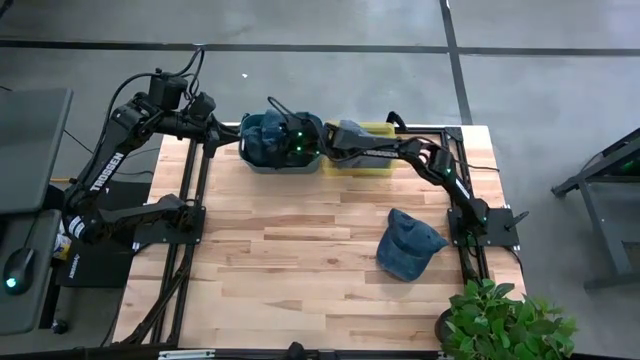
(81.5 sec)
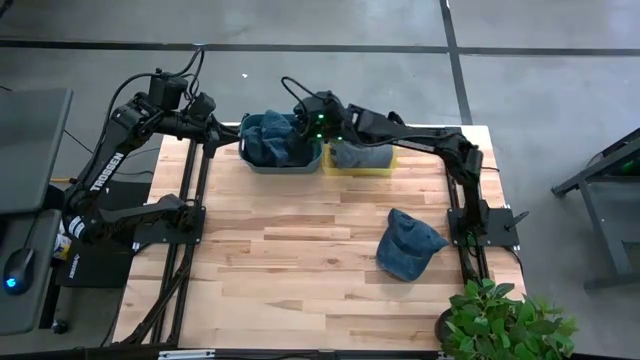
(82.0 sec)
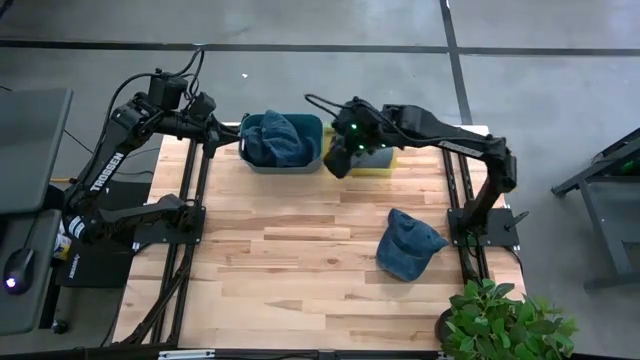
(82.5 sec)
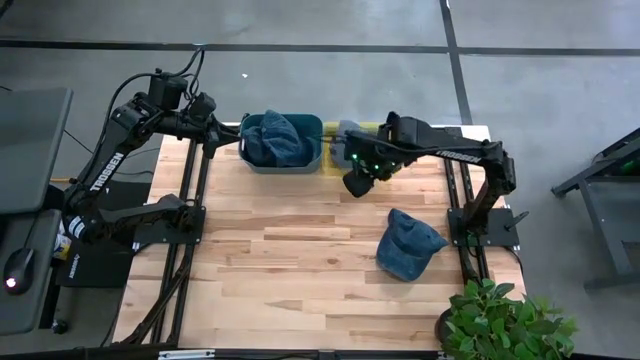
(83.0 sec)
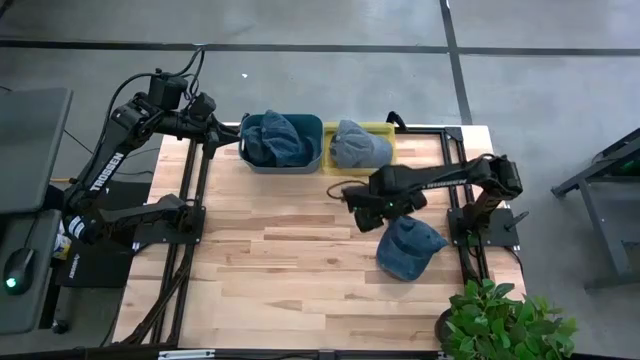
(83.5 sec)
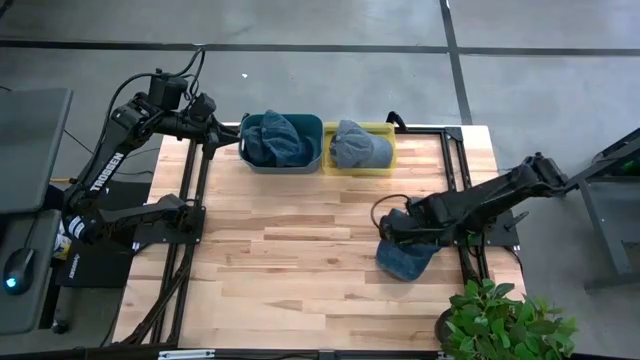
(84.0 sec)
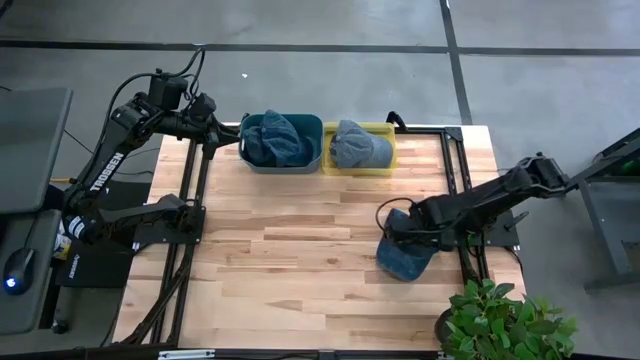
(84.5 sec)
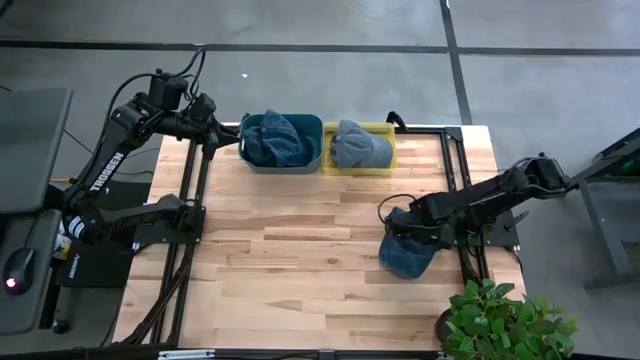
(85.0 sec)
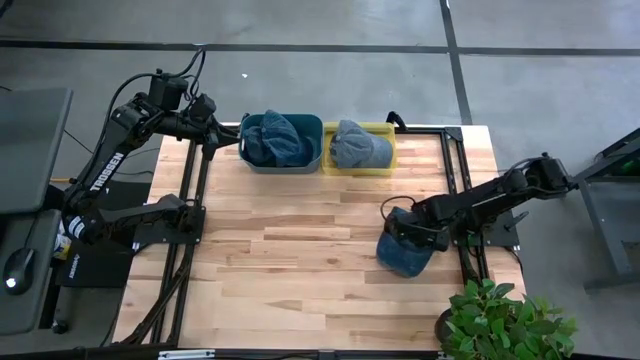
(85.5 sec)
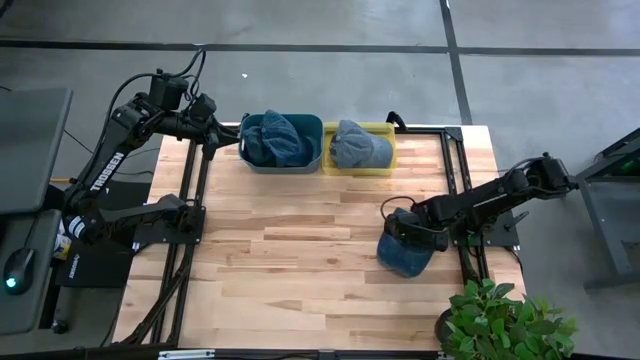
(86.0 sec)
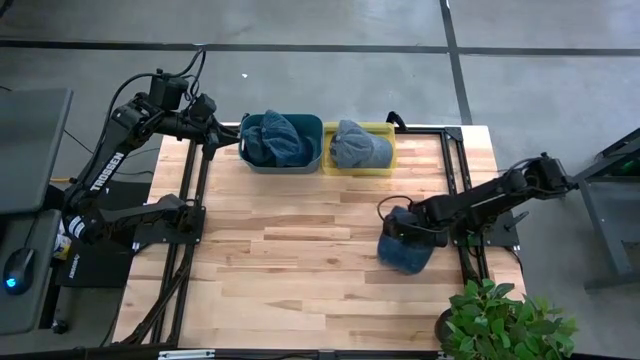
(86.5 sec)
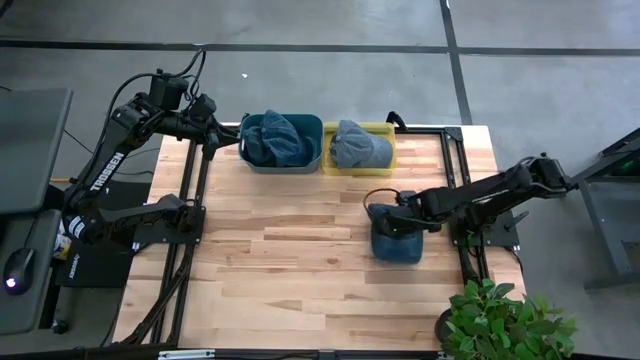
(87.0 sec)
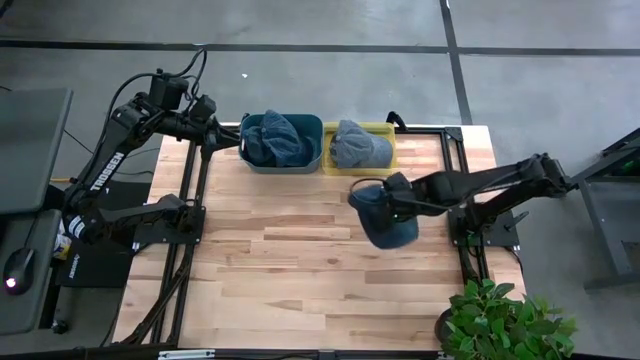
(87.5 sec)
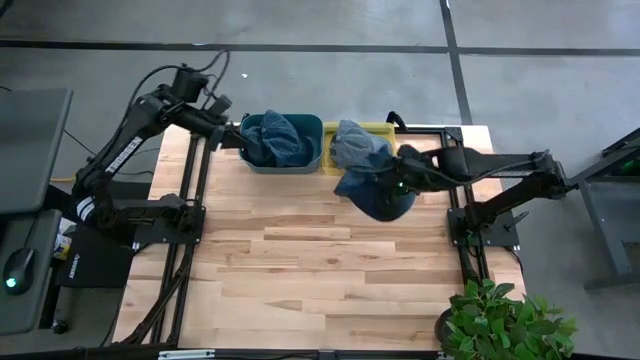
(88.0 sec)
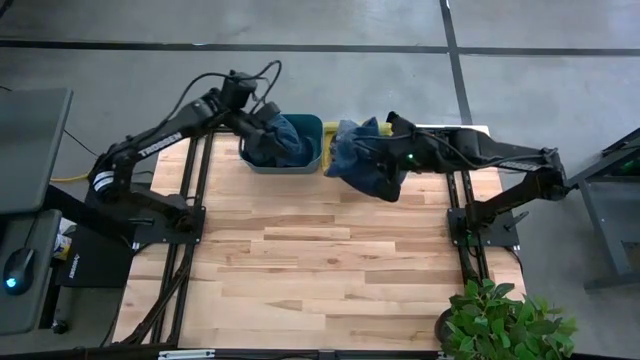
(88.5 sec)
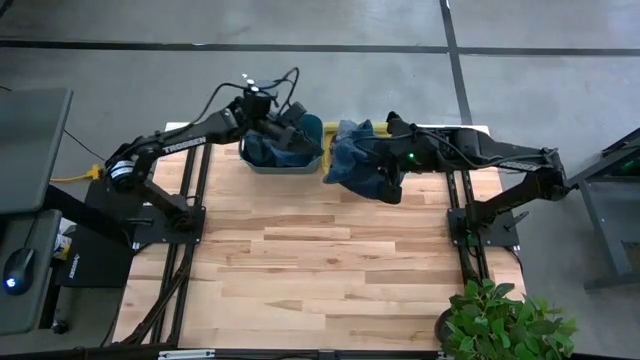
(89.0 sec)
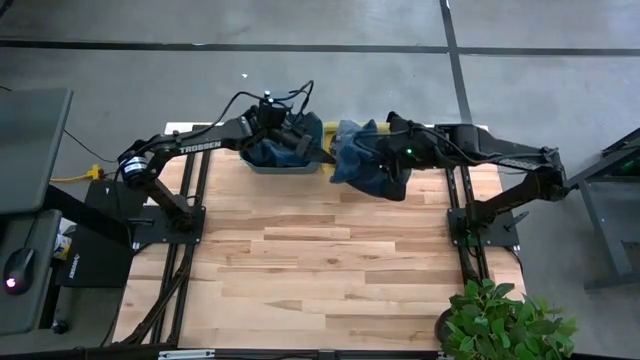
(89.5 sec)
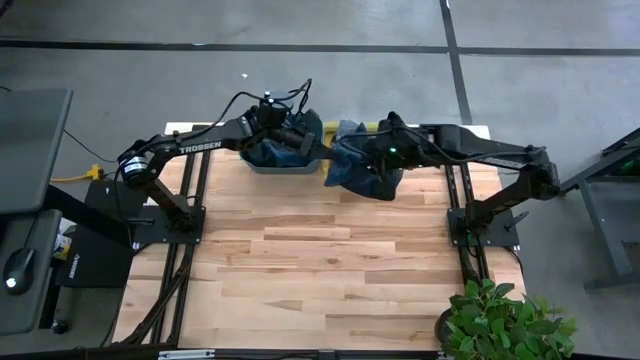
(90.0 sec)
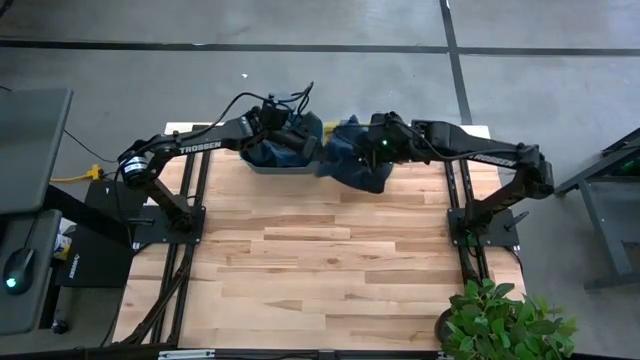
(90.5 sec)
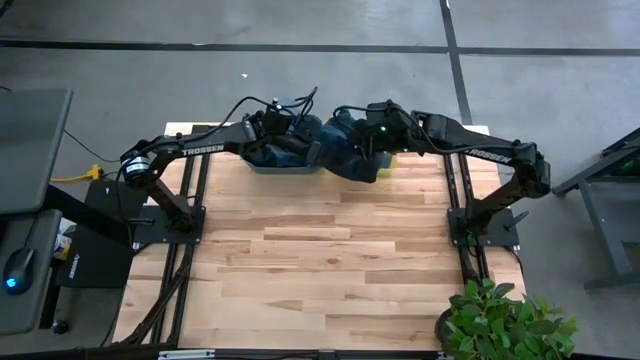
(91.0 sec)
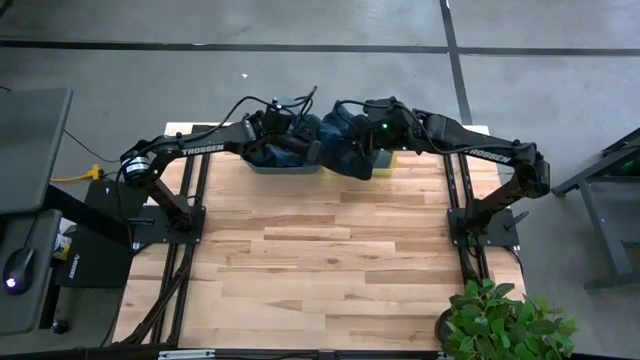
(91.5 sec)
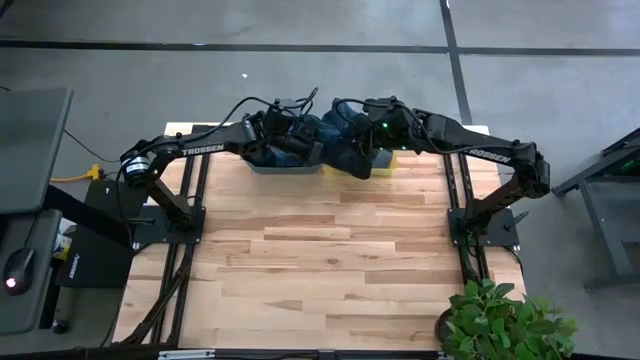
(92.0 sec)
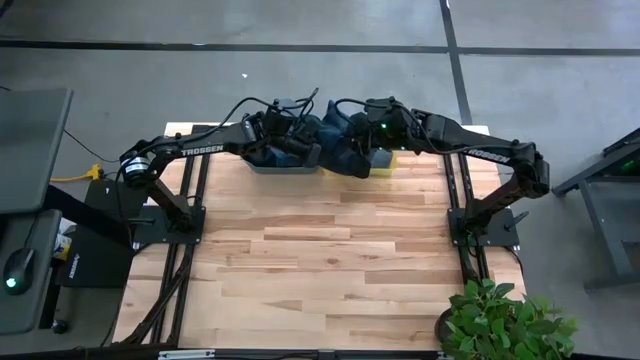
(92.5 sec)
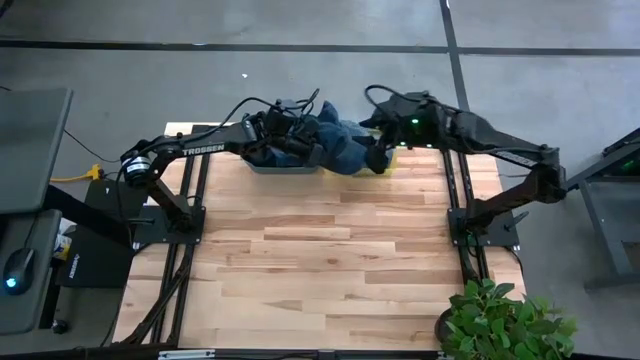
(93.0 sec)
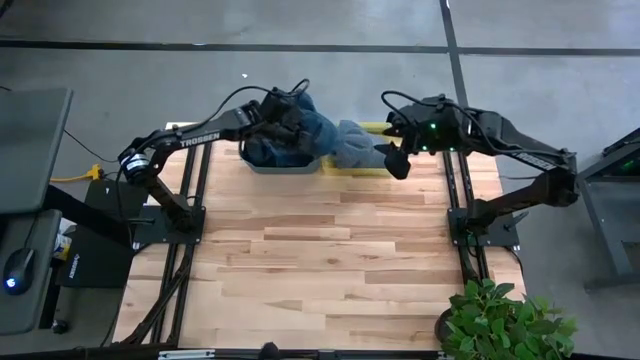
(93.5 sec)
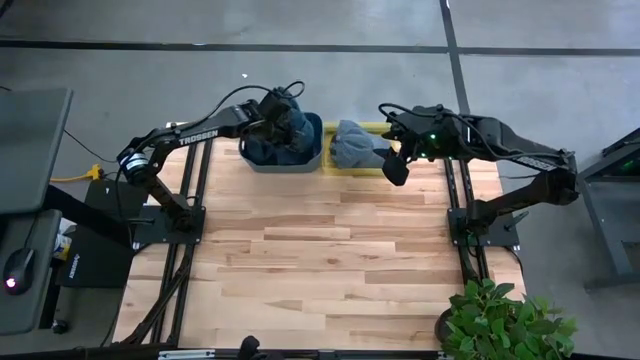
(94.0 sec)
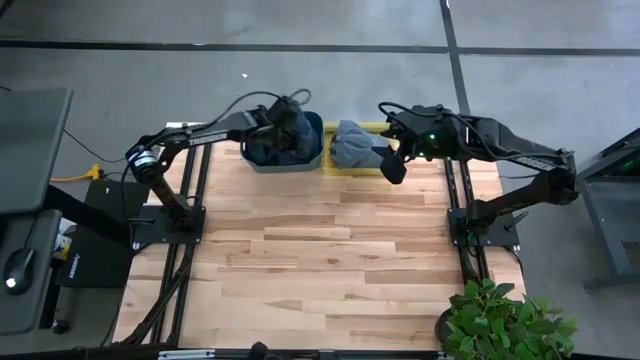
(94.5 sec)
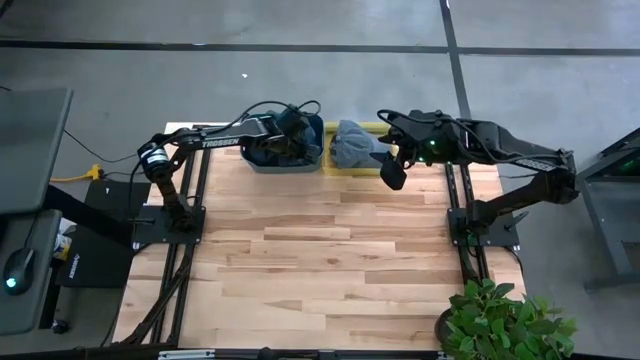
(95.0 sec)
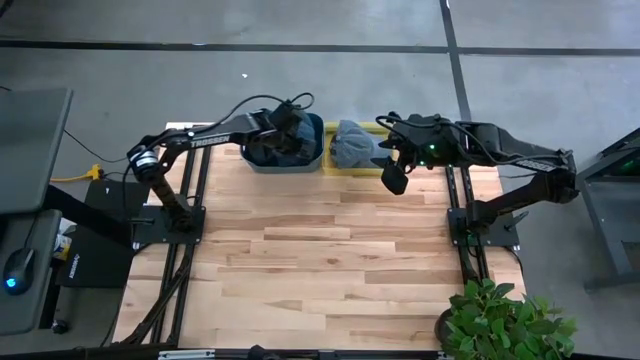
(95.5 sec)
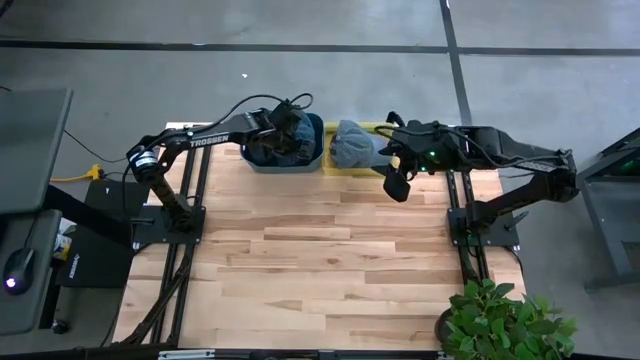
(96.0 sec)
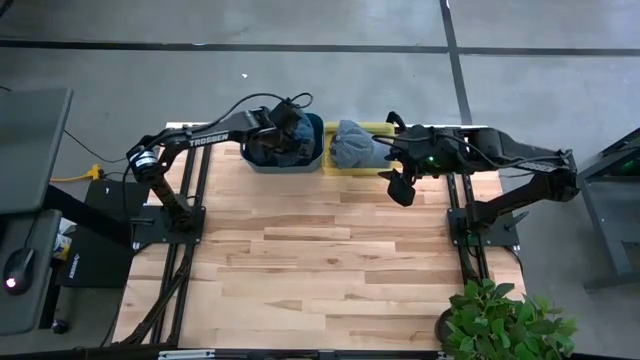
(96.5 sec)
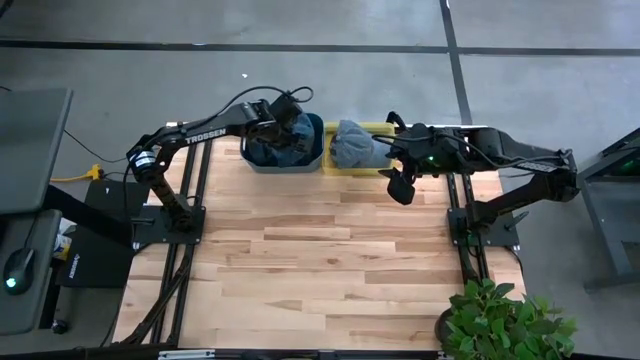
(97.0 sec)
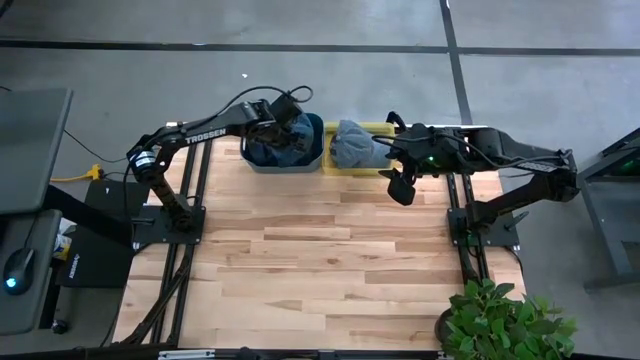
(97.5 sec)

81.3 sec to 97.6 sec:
Task: Pick & Place hat
Put the blue cap into the blue bin

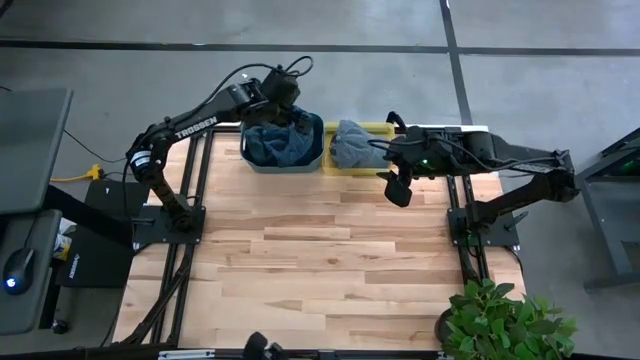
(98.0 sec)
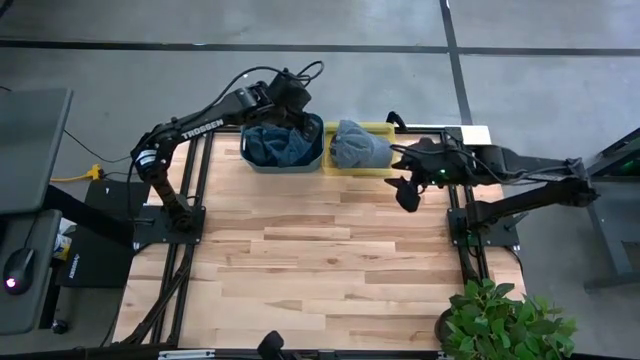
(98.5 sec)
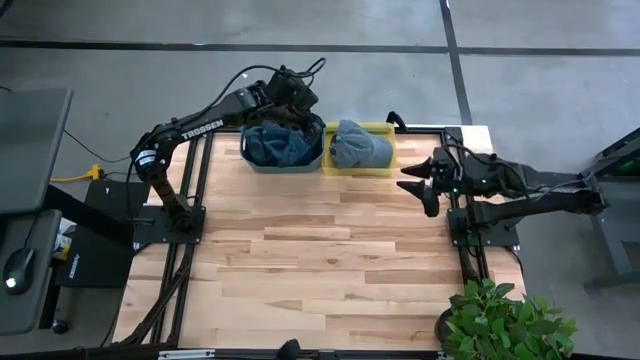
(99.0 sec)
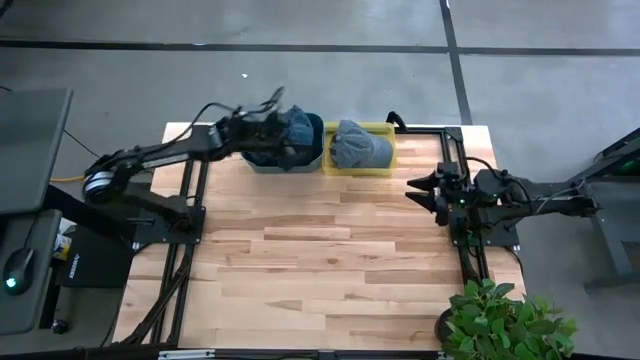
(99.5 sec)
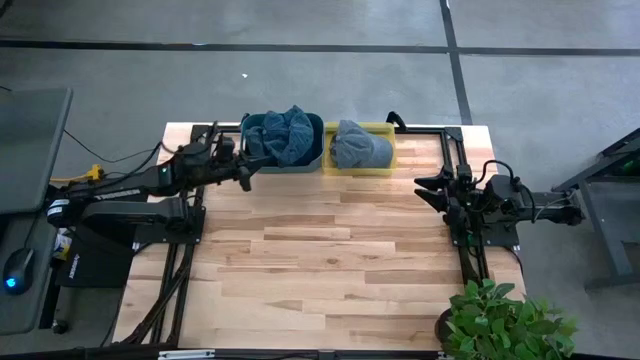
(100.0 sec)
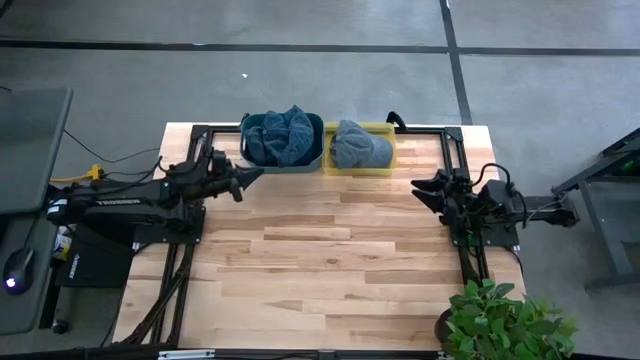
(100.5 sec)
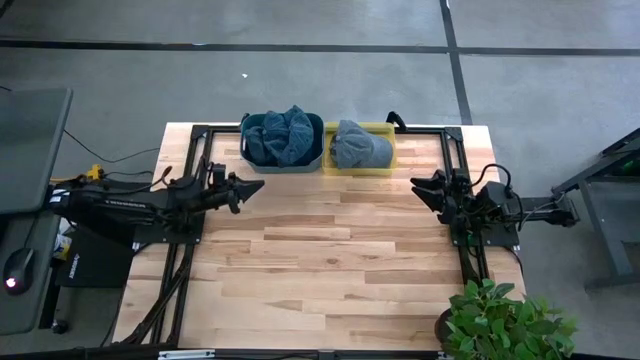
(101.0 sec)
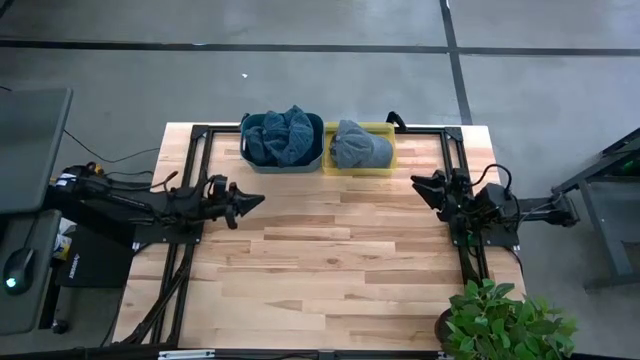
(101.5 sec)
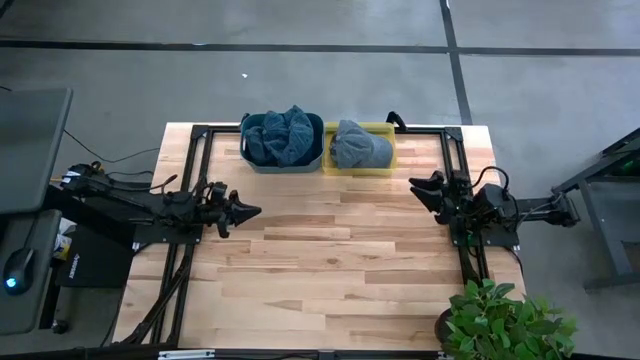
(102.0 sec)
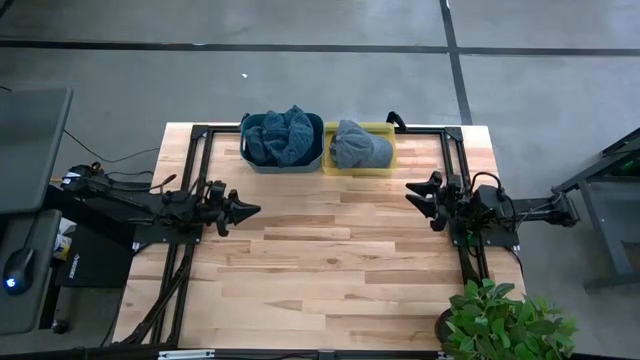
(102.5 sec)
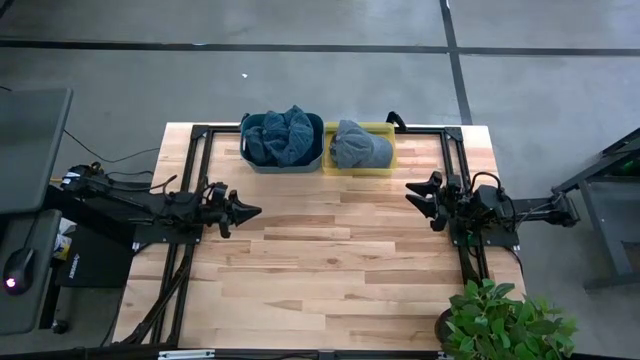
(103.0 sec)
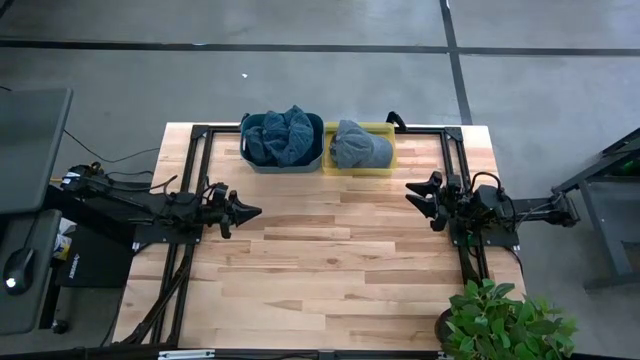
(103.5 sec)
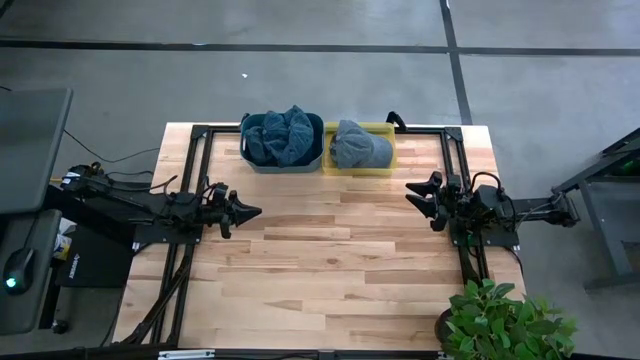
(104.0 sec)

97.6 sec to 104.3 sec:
Return to Home Position
